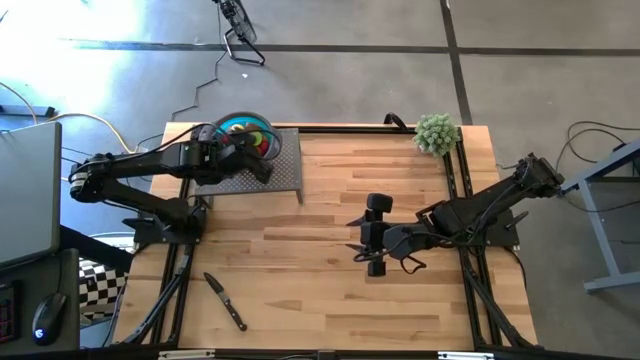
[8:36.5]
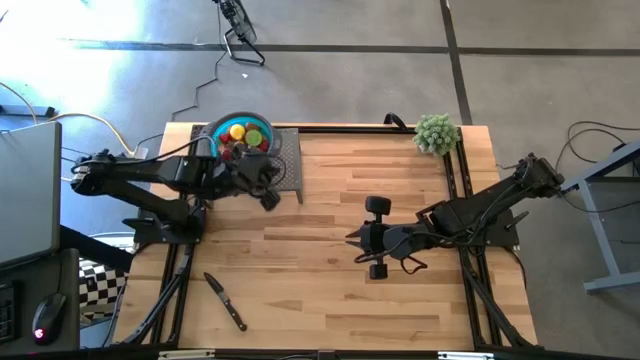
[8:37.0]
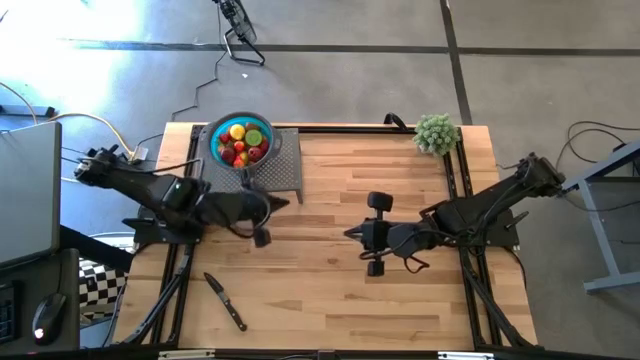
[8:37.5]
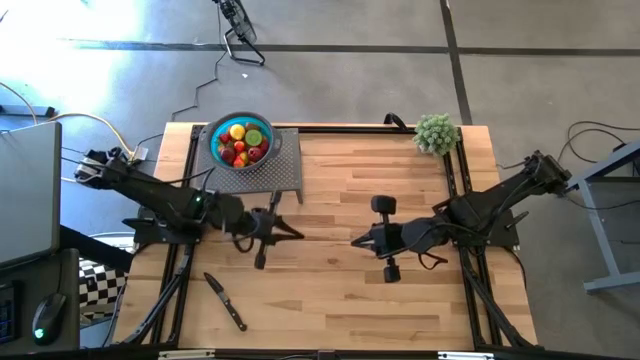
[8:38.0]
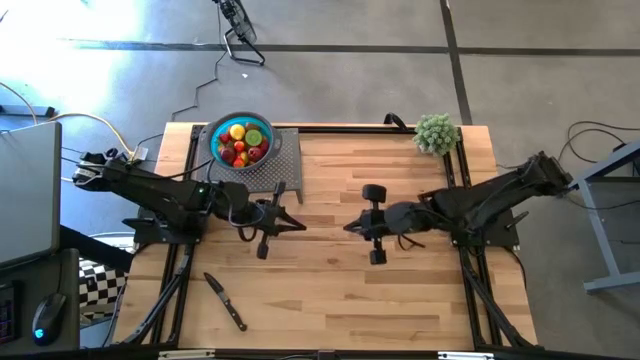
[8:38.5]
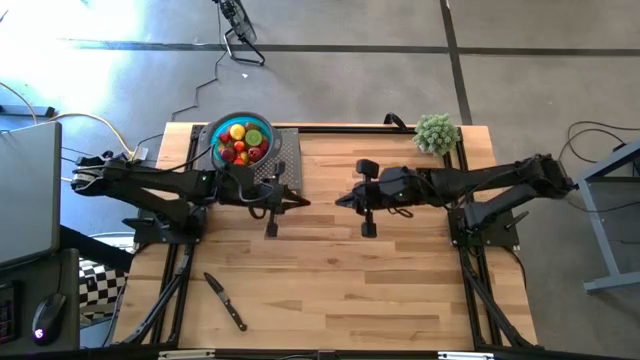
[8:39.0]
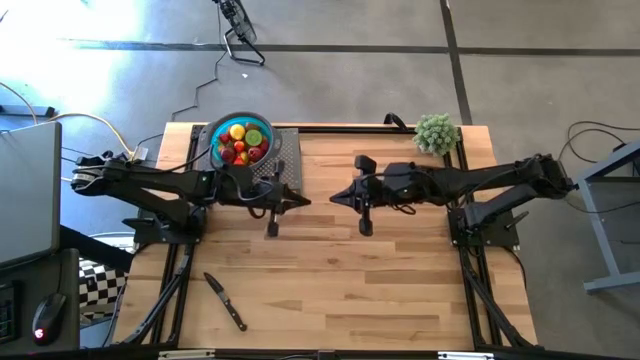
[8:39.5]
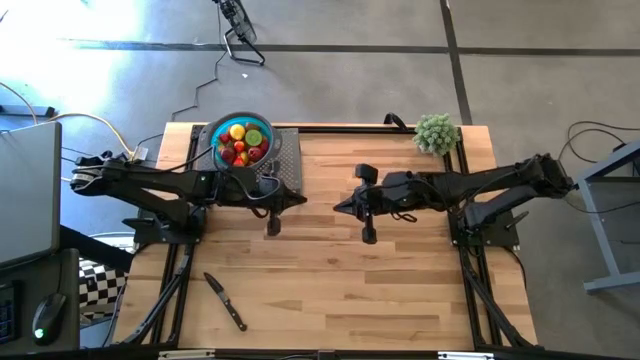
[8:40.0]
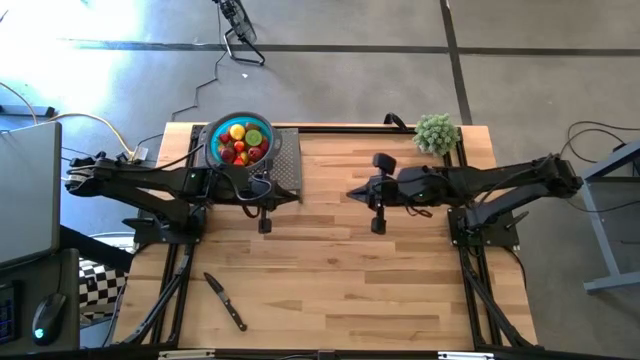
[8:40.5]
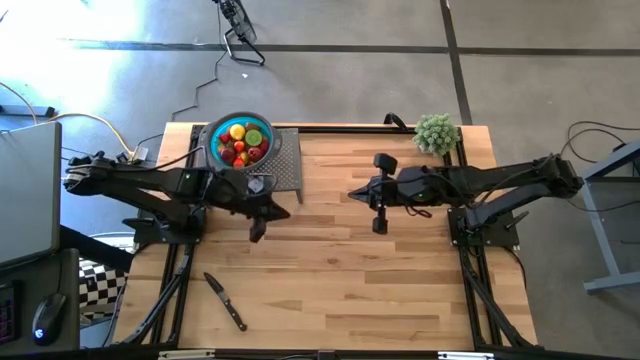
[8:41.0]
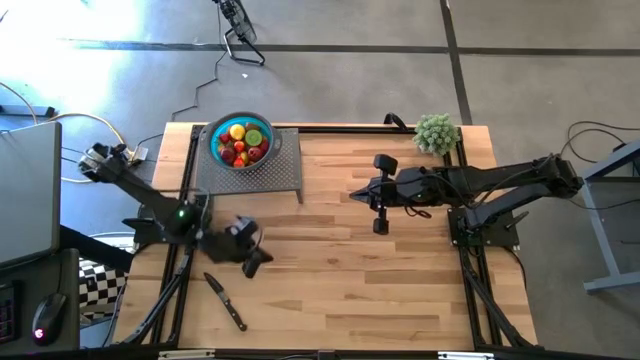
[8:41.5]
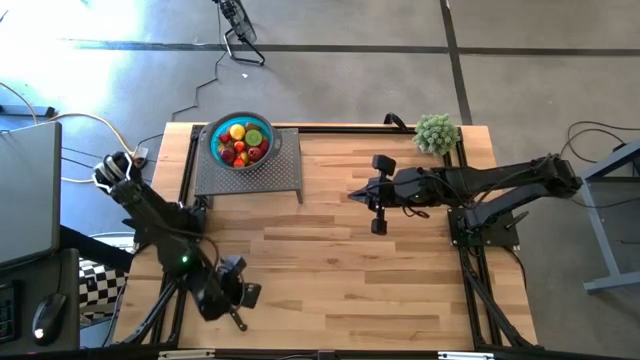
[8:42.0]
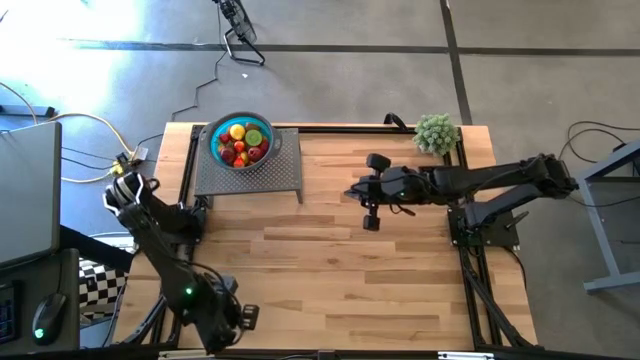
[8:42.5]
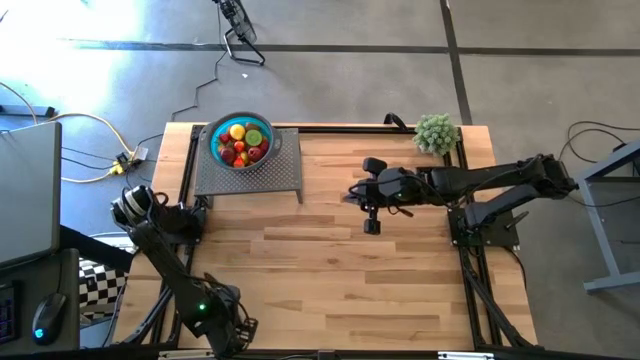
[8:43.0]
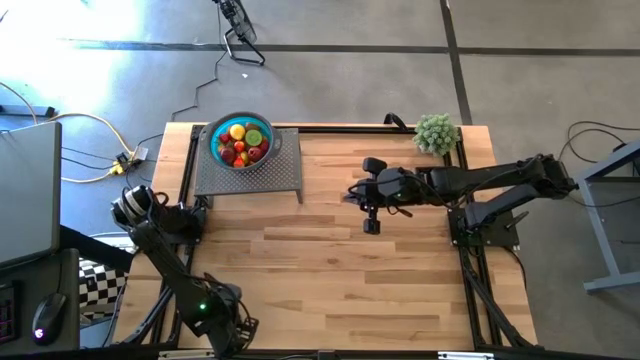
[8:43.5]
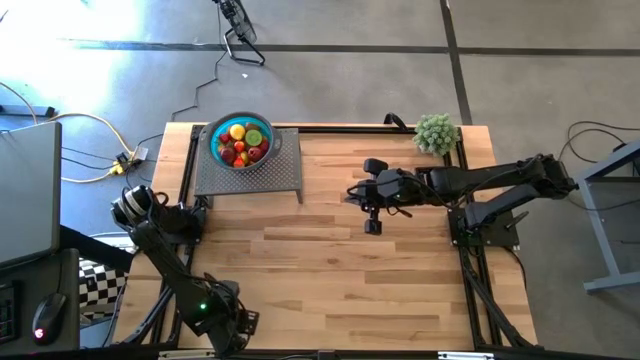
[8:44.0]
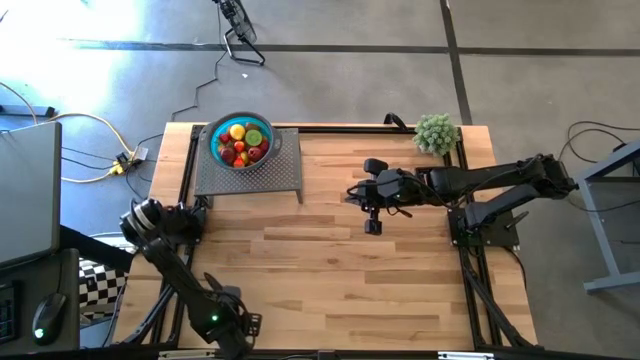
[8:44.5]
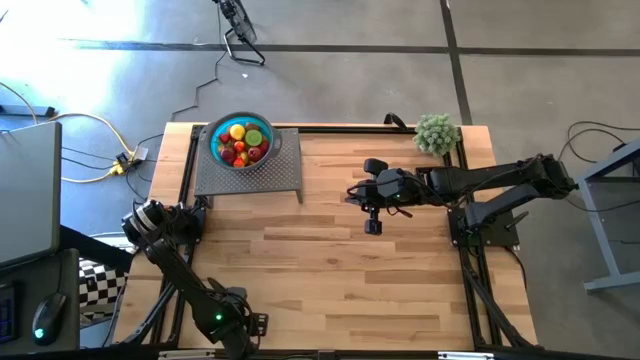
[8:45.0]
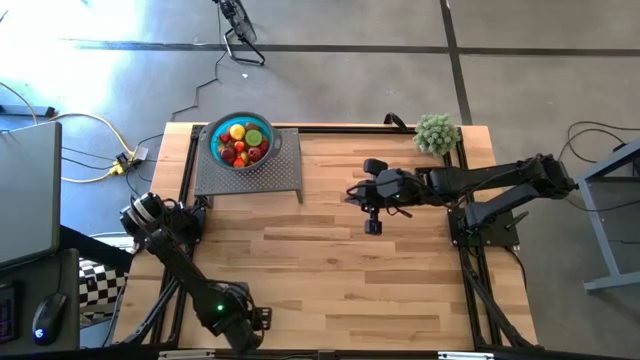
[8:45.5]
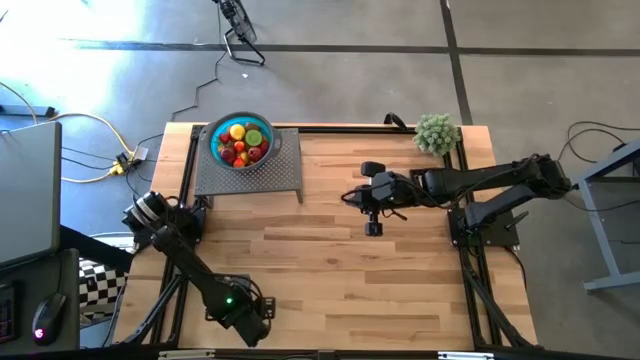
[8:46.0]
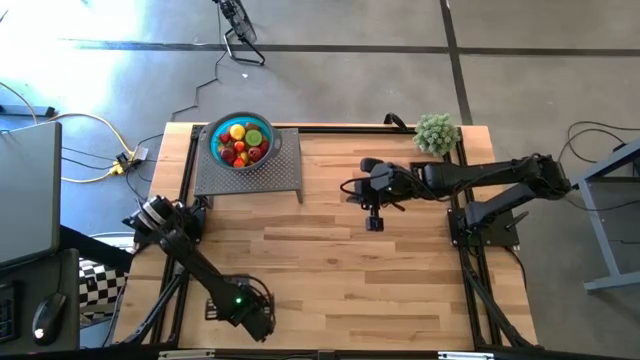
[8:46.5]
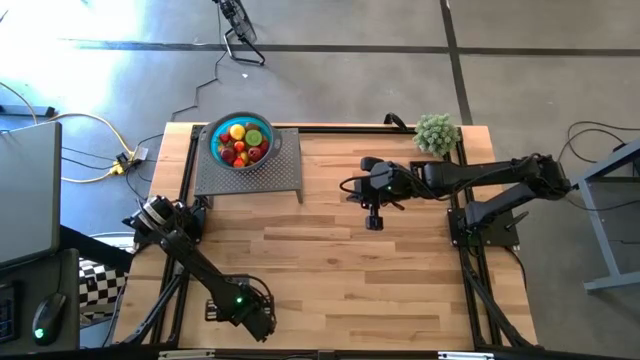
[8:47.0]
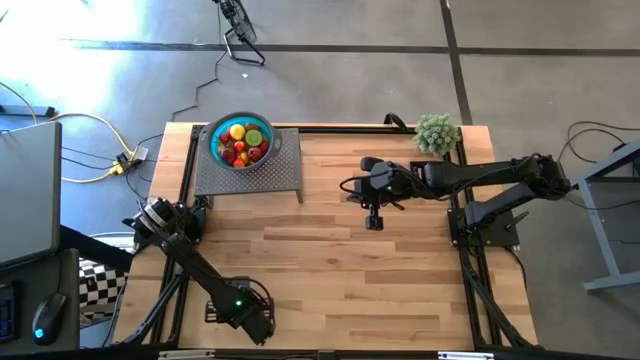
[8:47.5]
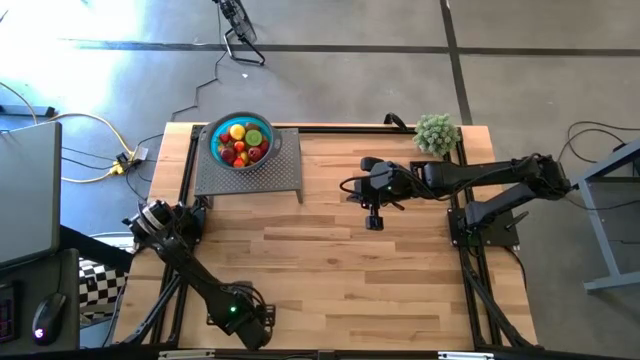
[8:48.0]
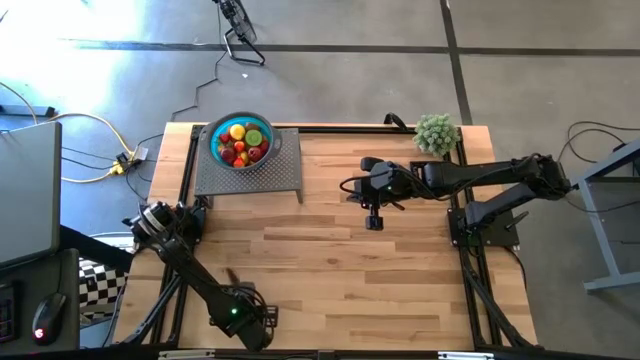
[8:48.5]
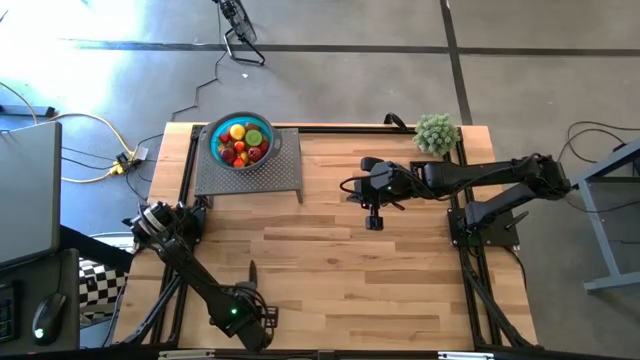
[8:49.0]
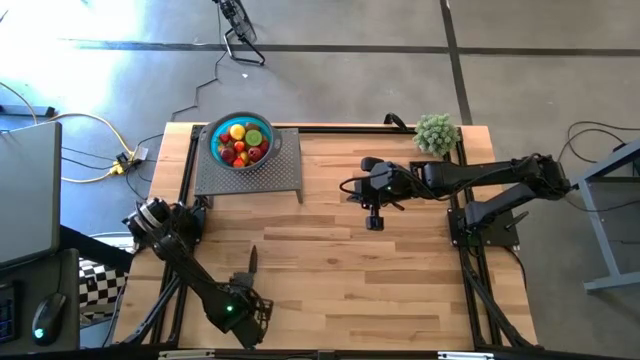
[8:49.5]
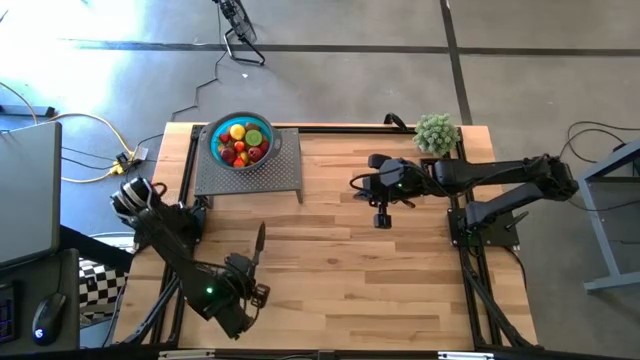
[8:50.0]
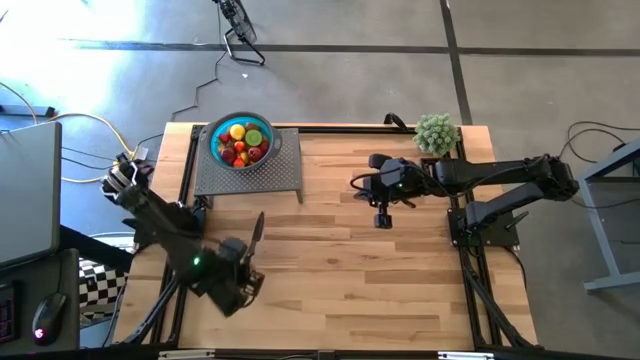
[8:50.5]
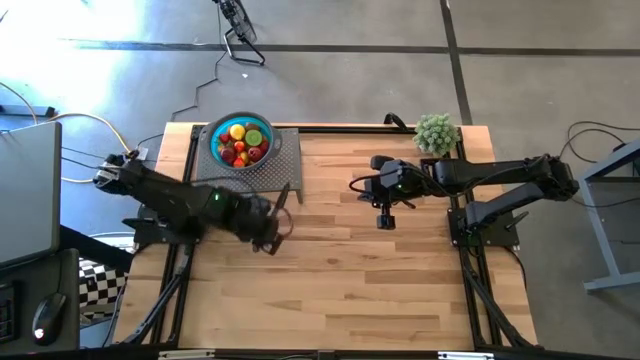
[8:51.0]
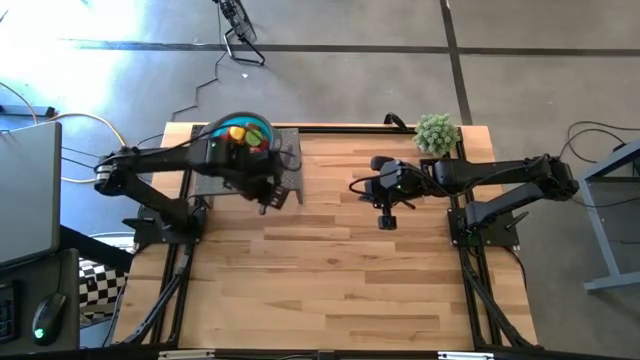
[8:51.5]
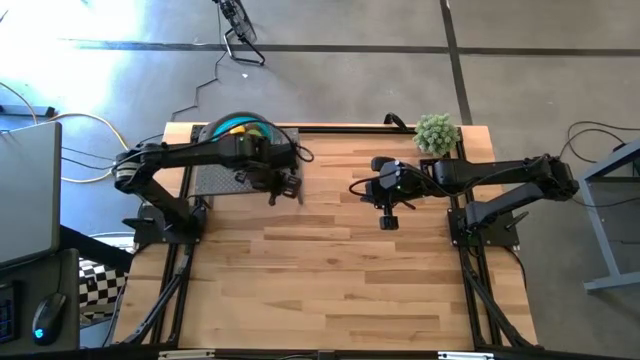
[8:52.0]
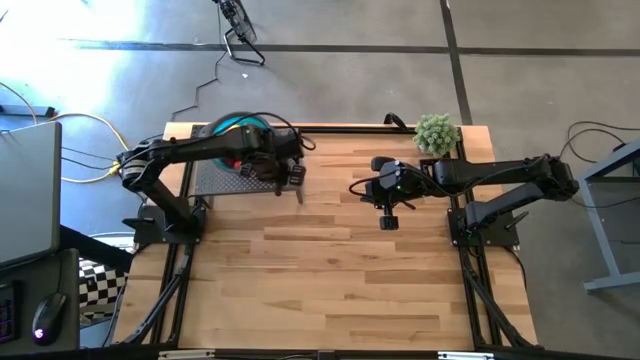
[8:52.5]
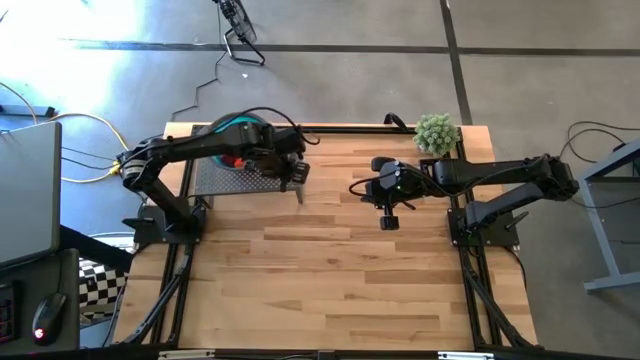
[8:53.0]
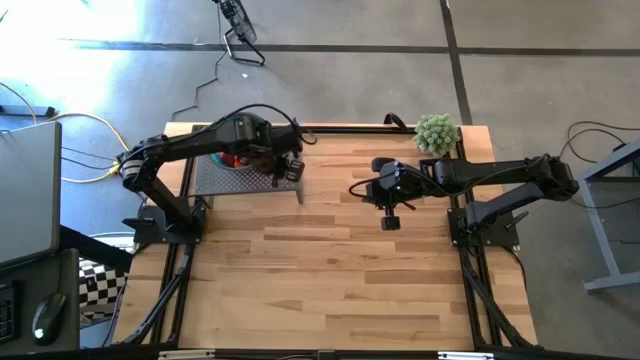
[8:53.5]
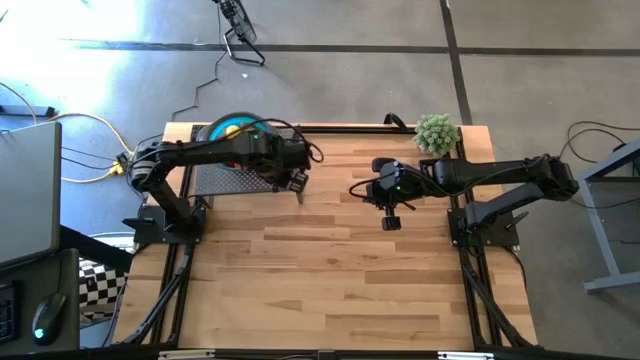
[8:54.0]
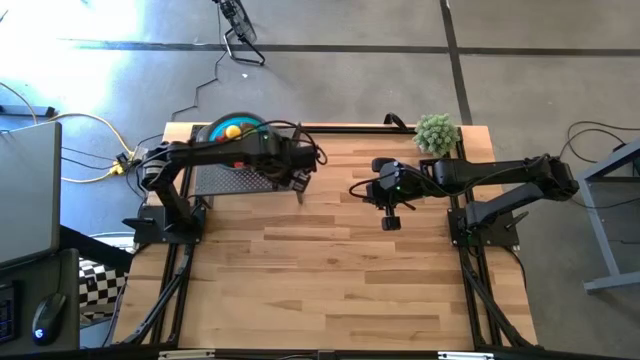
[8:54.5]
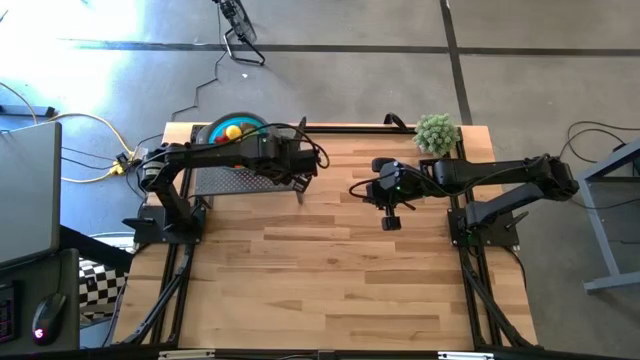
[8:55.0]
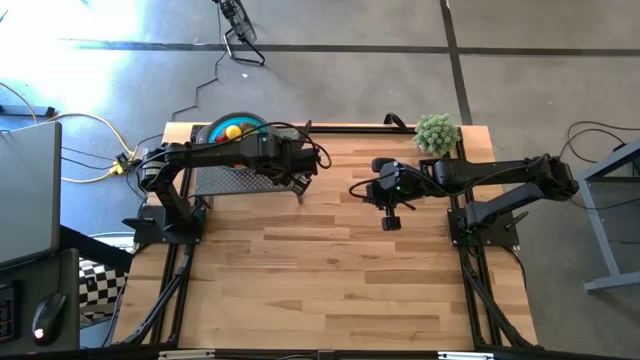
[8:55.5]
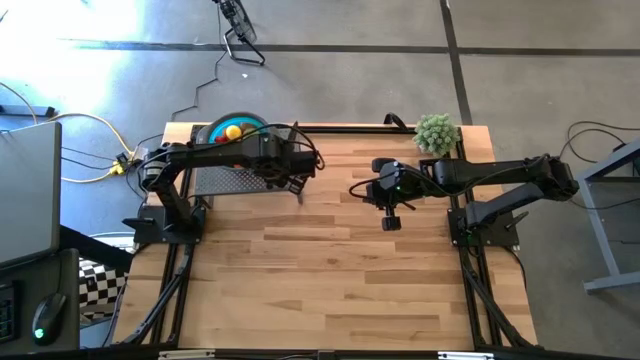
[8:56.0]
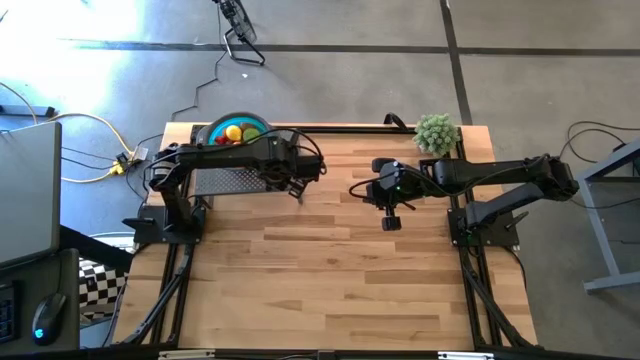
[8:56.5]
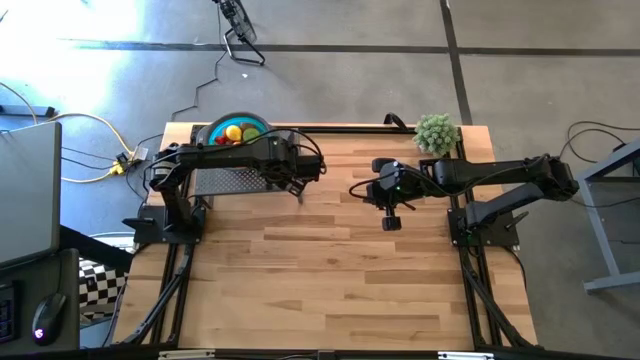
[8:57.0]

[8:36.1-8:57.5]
Task: Pick & Place Fruit
Put the black knife on the shelf

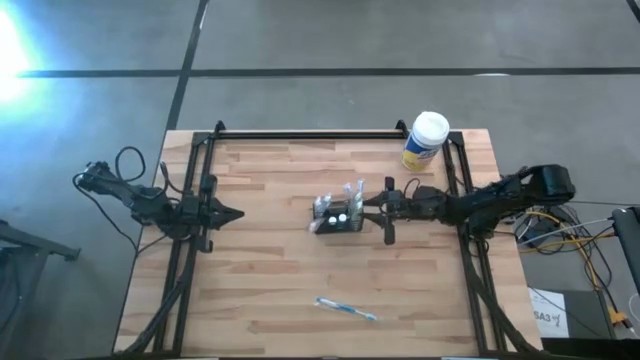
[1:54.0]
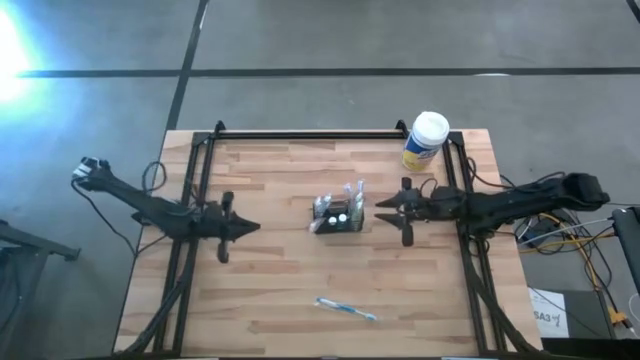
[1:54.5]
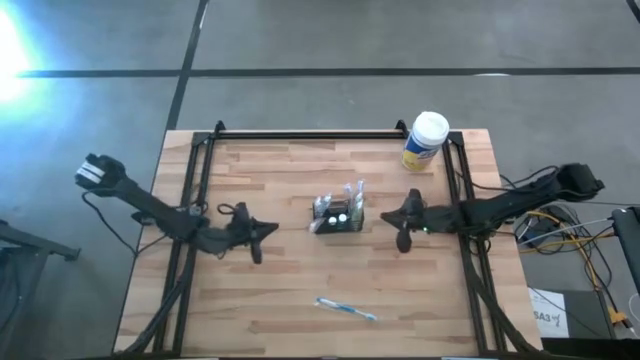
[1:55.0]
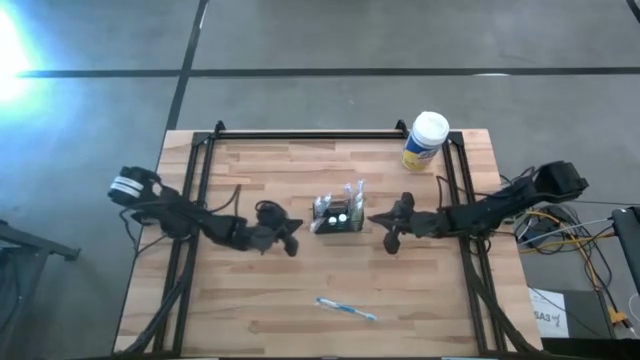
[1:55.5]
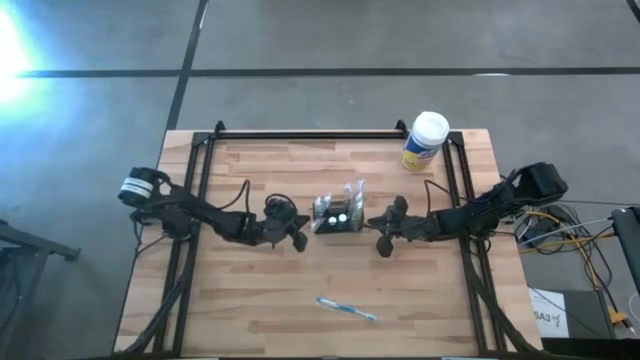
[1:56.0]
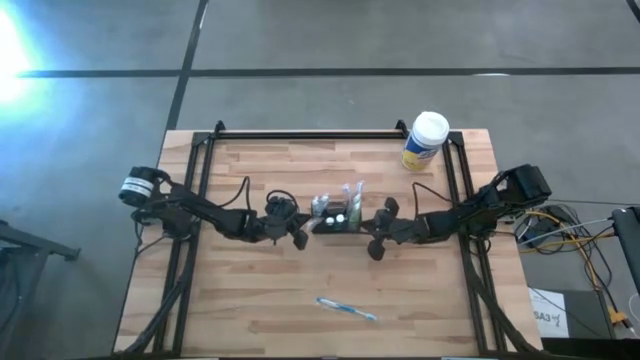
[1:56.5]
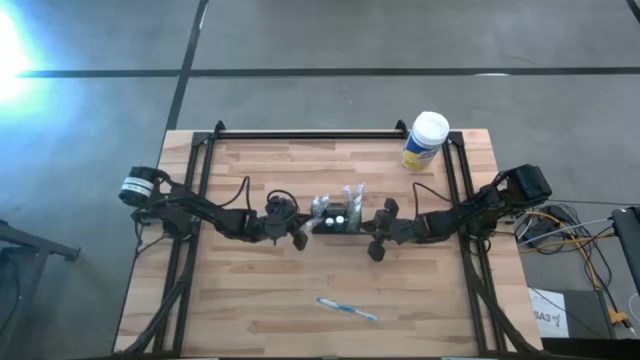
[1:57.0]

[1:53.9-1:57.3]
Task: Pick & Place toothbrushing station
Adjust the wire organizer
